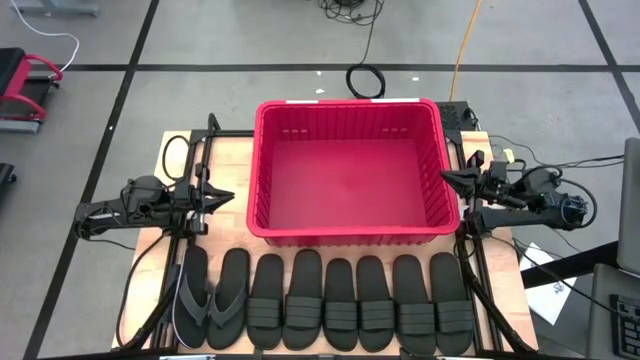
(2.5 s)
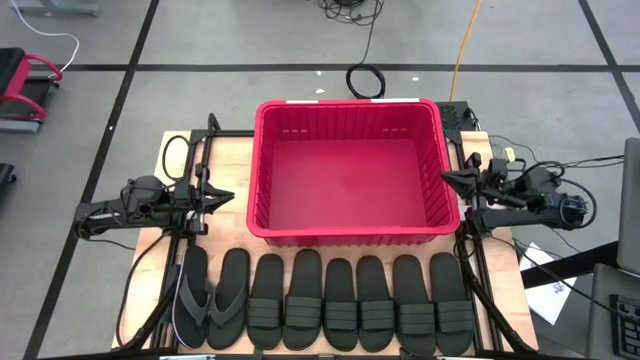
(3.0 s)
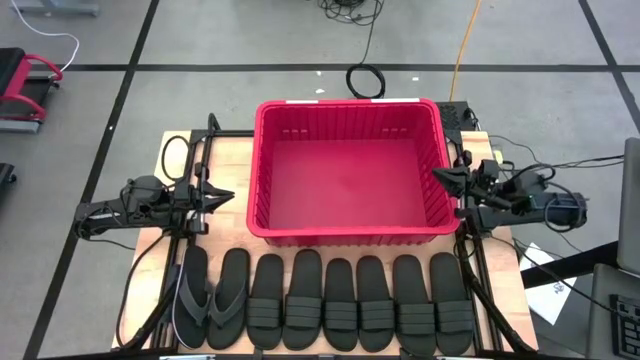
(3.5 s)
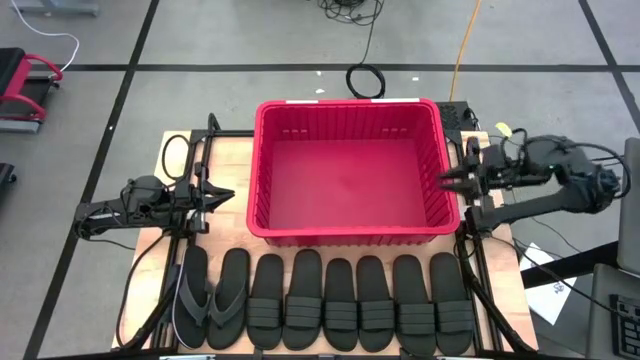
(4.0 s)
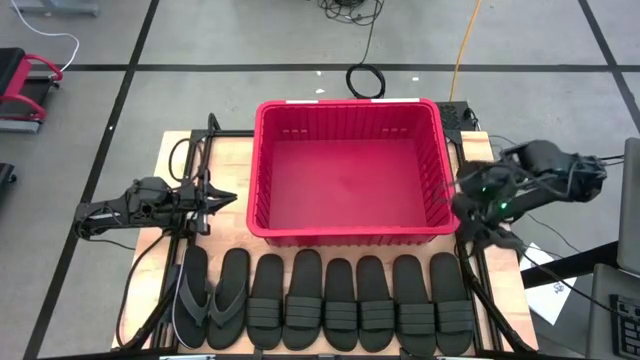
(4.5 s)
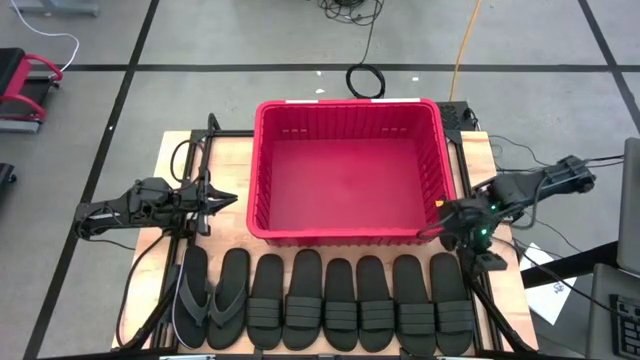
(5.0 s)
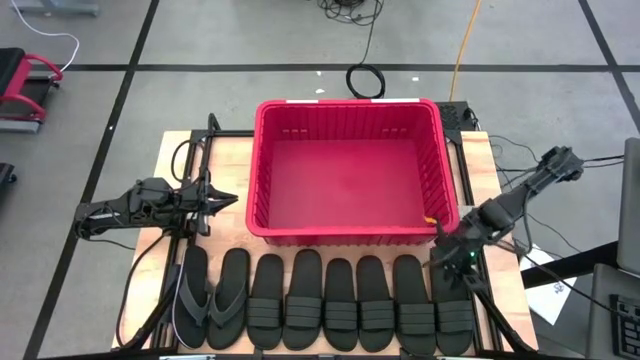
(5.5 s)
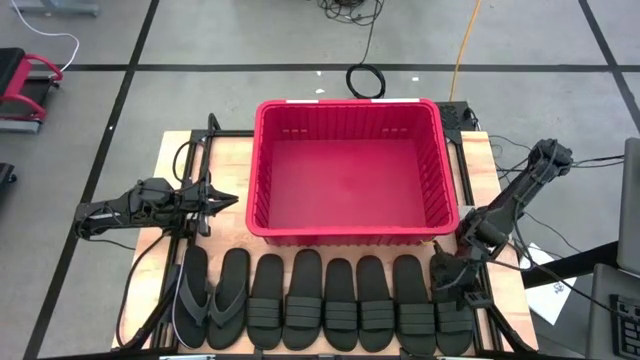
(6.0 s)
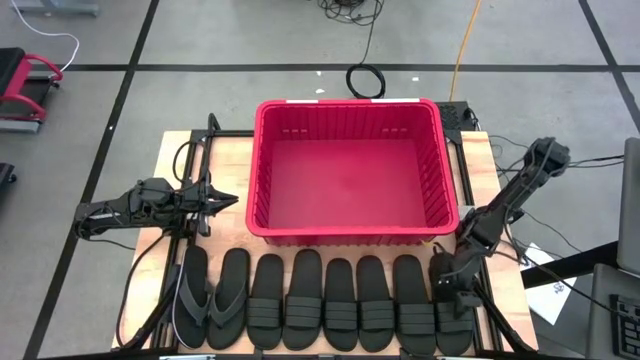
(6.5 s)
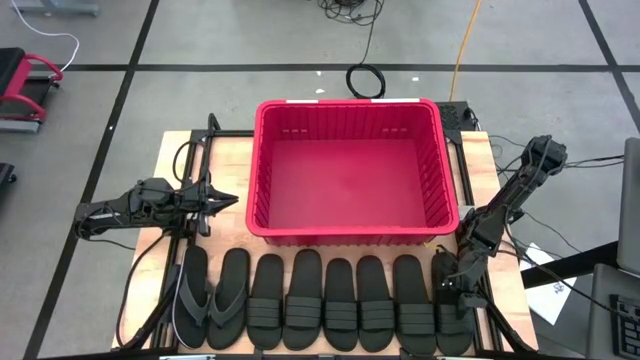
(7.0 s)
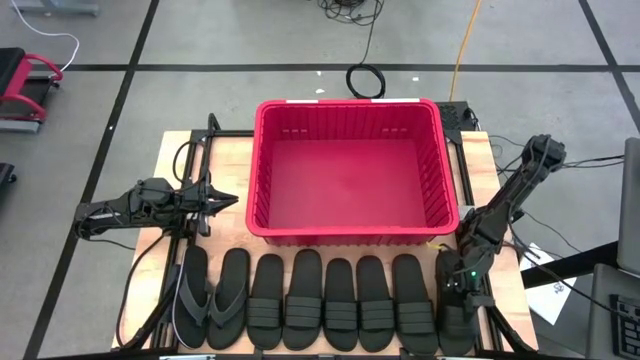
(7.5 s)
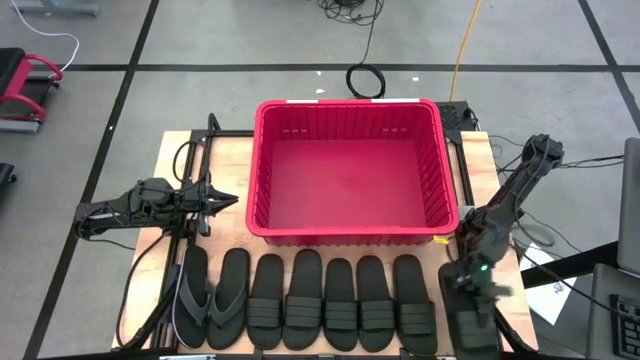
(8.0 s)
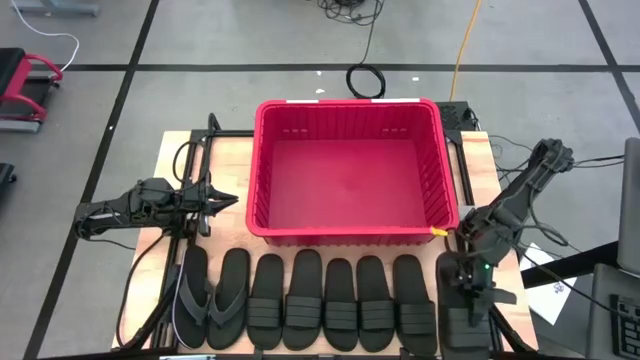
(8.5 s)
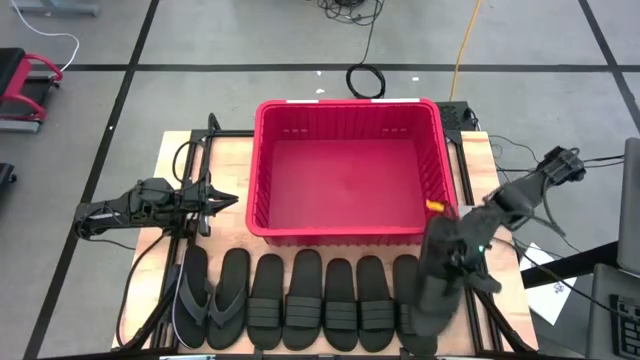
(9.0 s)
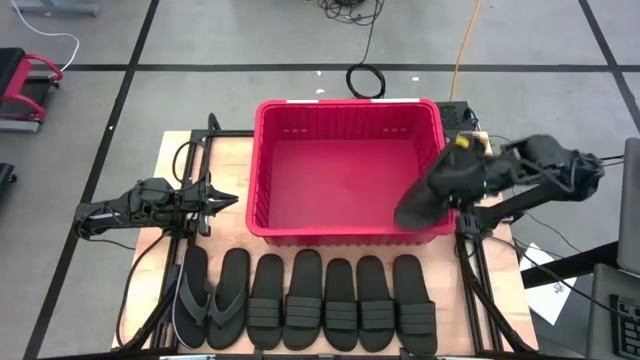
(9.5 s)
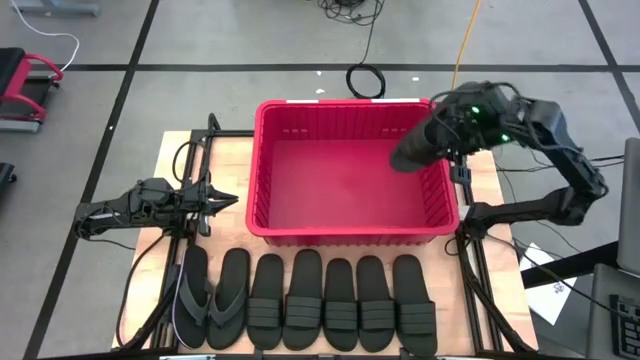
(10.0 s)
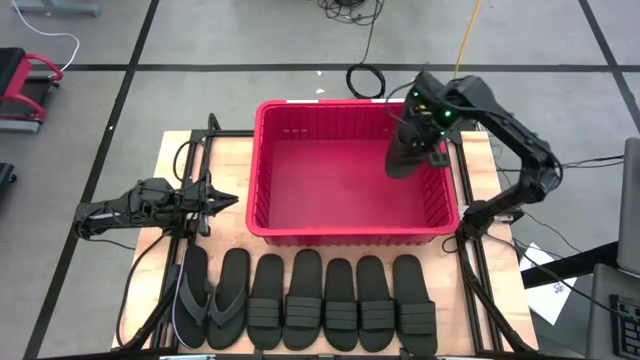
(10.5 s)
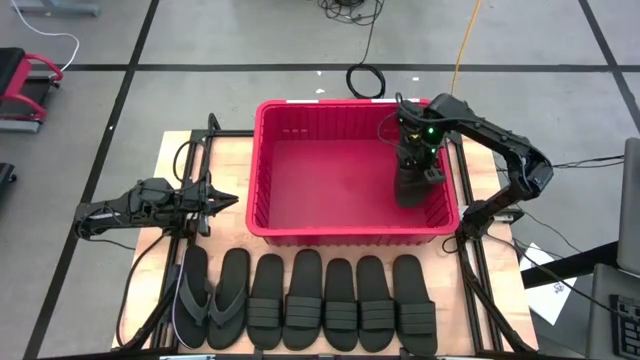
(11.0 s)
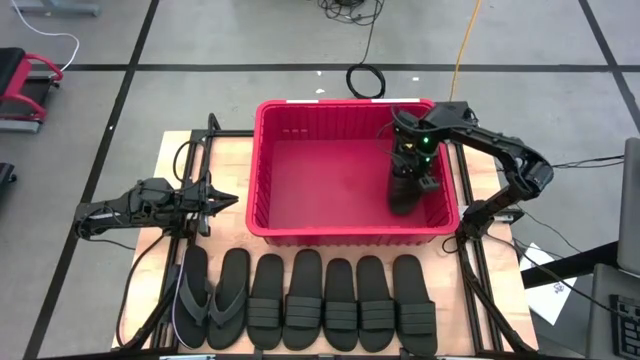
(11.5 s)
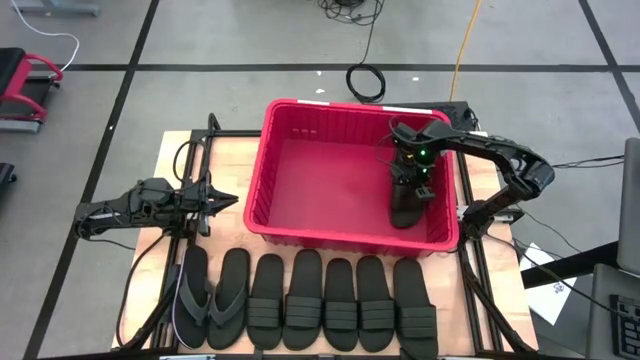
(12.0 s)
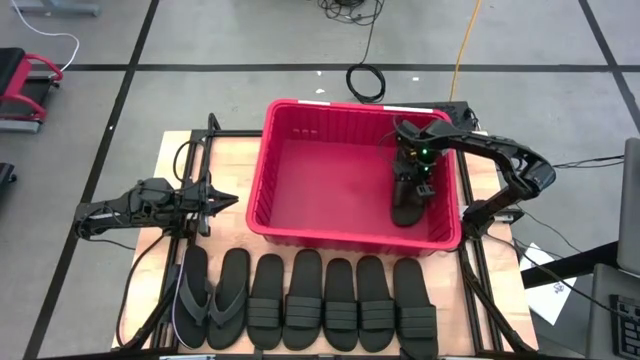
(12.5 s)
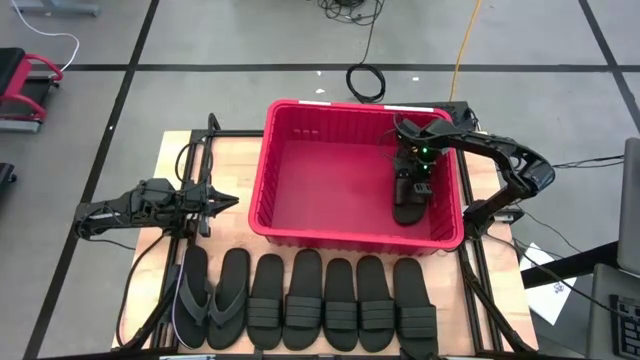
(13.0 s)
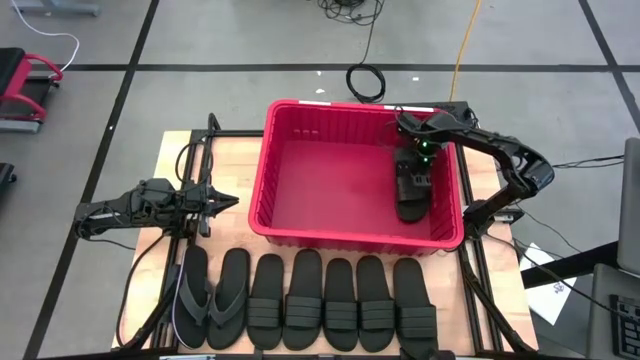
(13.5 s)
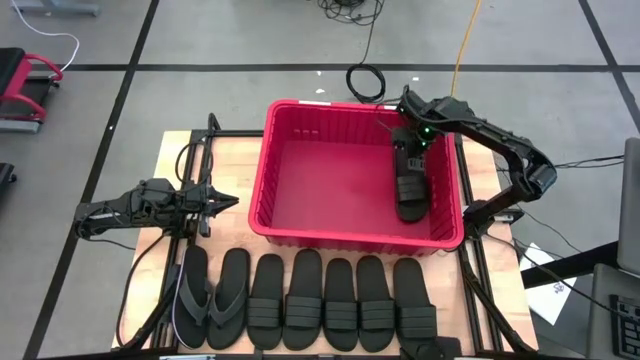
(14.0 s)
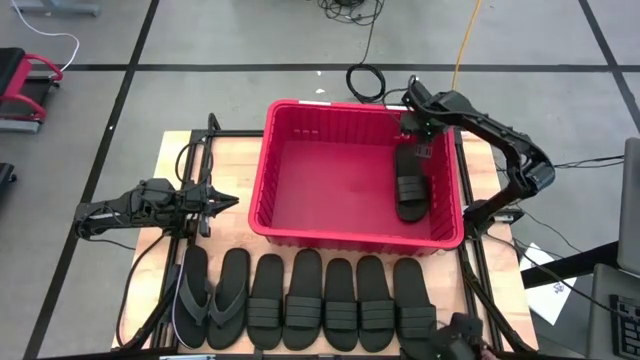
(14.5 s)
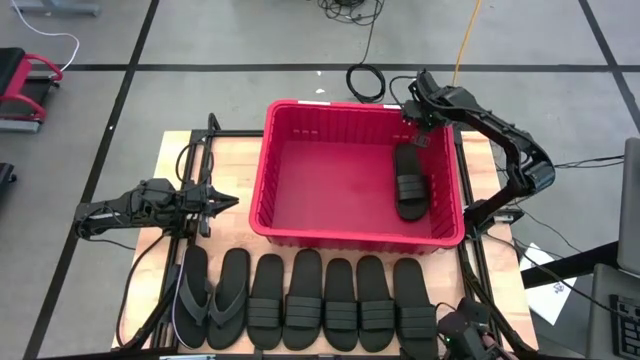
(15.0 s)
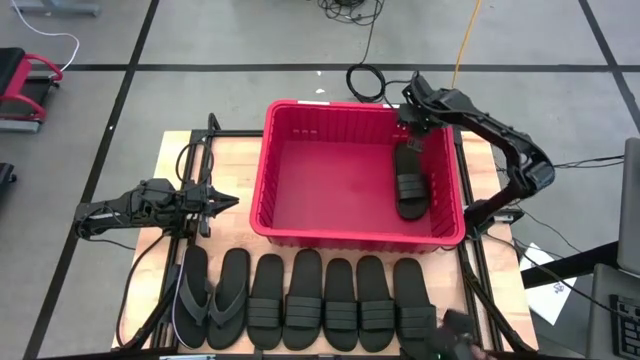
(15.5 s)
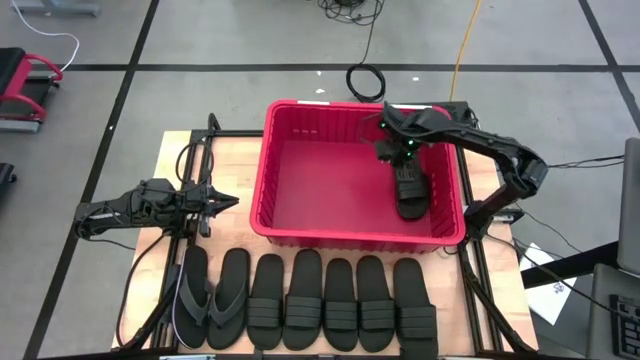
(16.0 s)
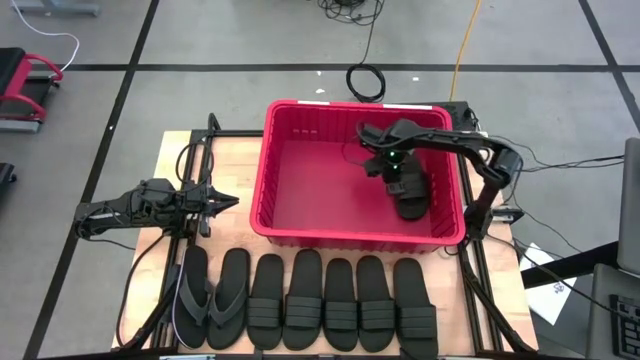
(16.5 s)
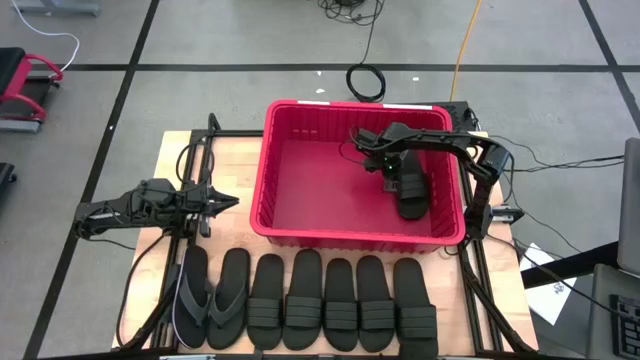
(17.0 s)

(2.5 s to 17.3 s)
Task: Pick and place slides into bin
Put the black slipper into the red bin
